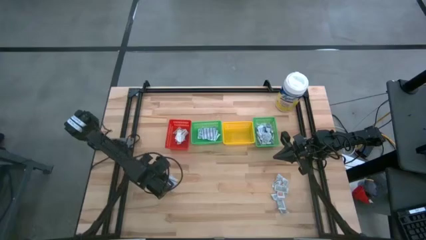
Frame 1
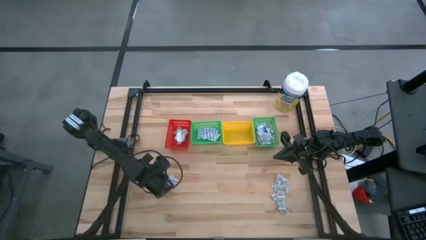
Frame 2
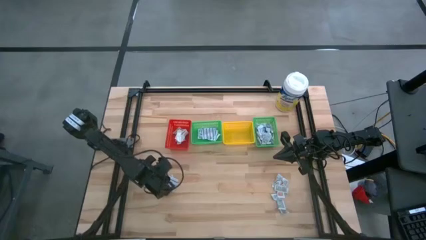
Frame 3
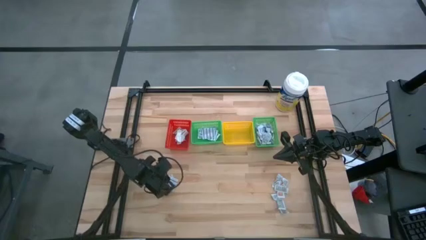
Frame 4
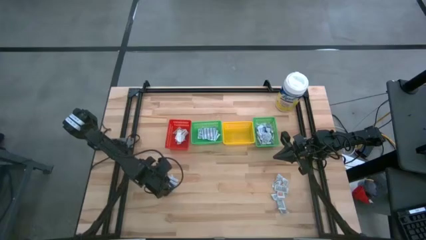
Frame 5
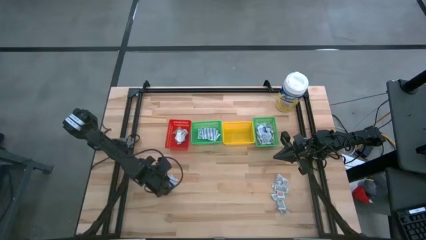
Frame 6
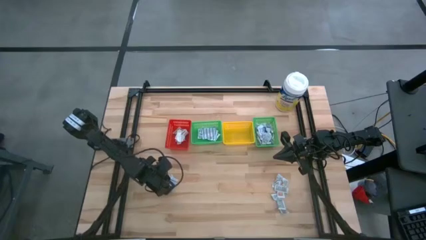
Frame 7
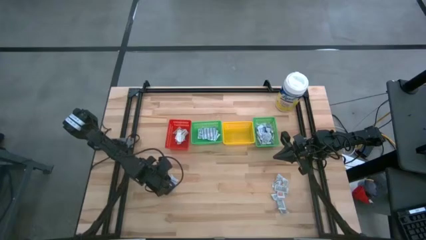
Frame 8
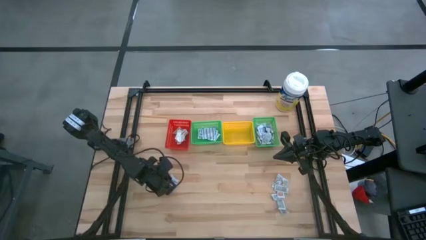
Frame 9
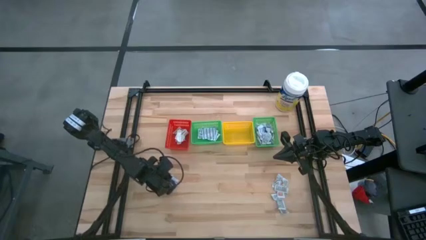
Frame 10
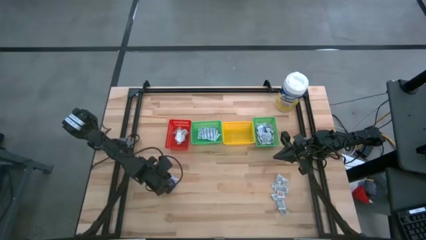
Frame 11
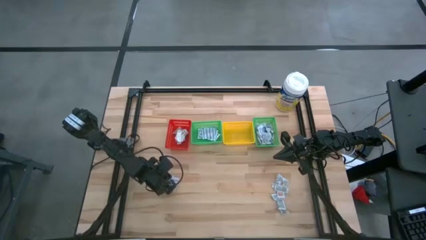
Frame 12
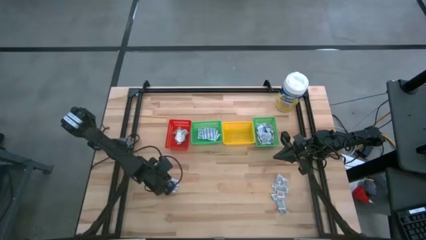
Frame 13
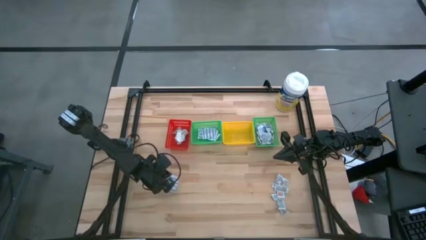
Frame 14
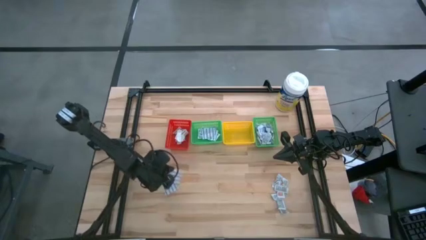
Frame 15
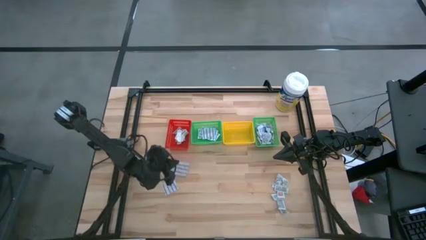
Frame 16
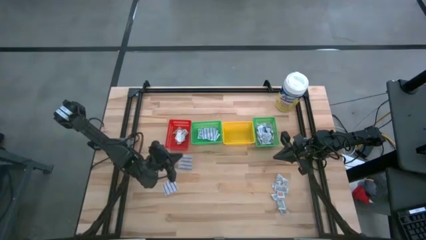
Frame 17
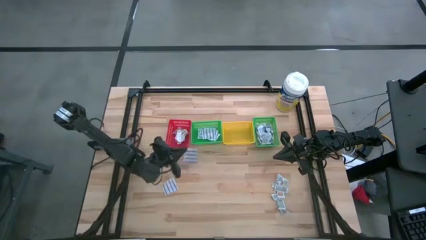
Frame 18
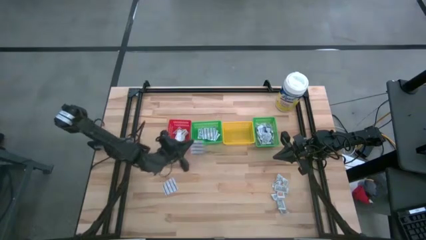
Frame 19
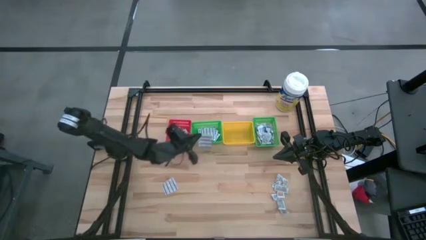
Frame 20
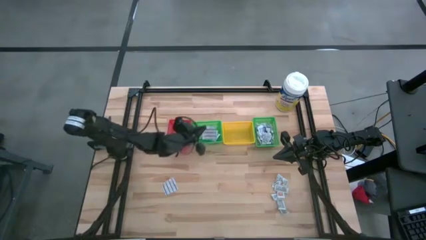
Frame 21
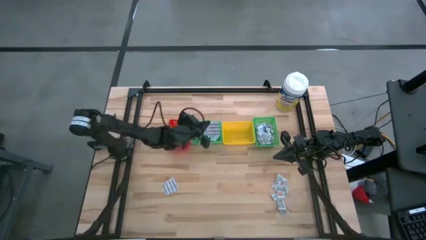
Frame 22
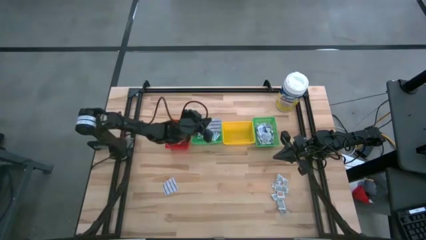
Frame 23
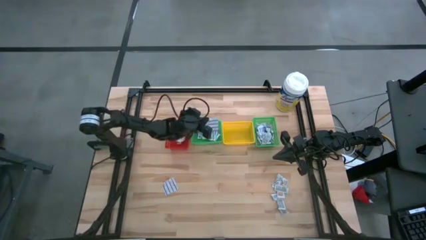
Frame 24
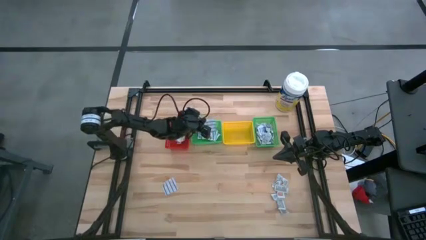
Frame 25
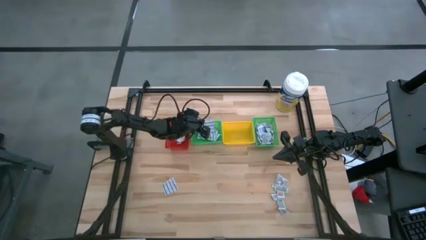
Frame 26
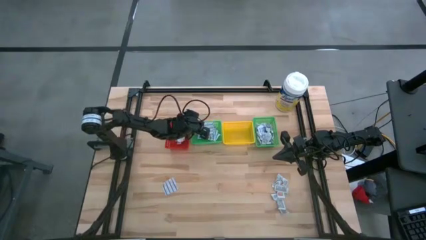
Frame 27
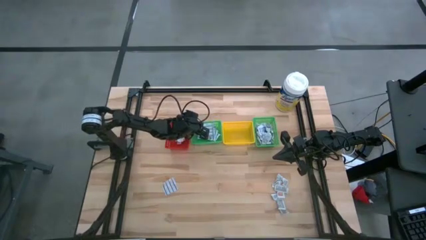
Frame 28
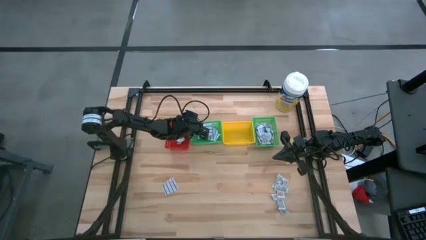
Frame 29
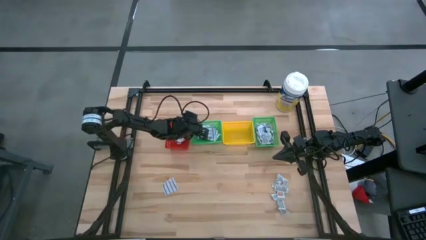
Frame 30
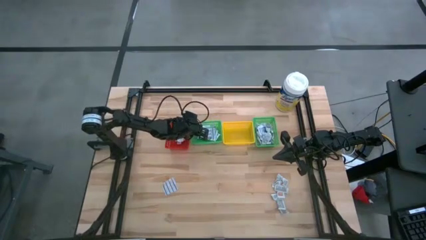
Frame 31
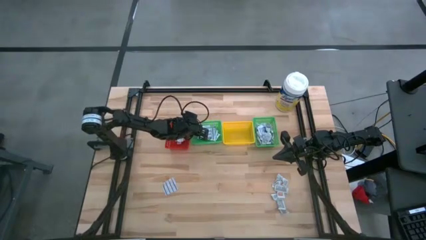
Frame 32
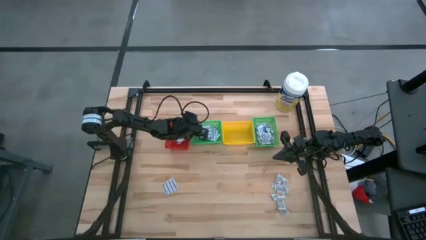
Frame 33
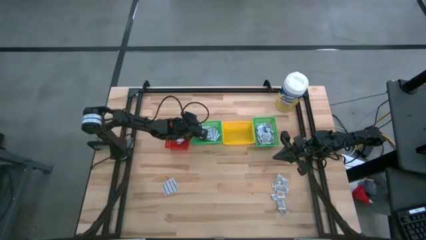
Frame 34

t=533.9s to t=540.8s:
Task: Pick & Place First Aid Supplies
Put the blue bandage into the left green bin

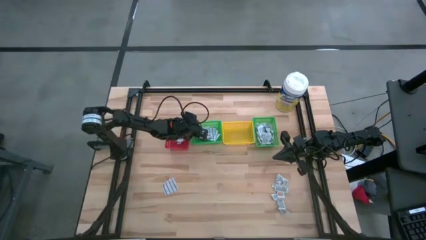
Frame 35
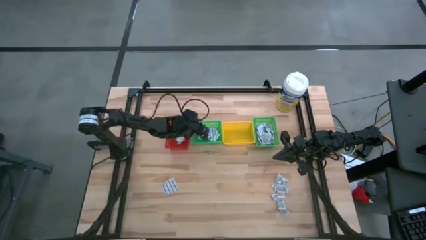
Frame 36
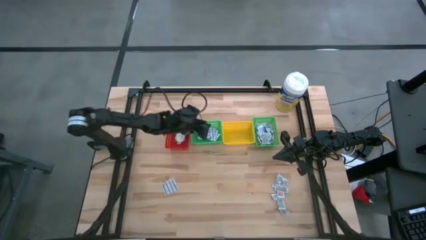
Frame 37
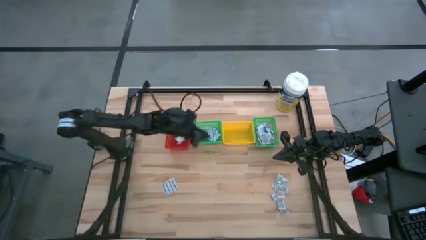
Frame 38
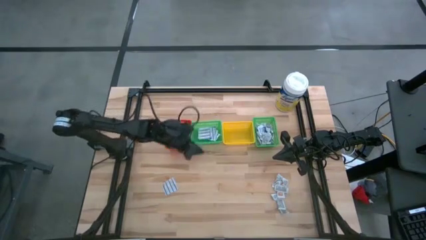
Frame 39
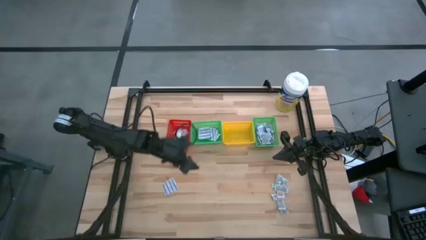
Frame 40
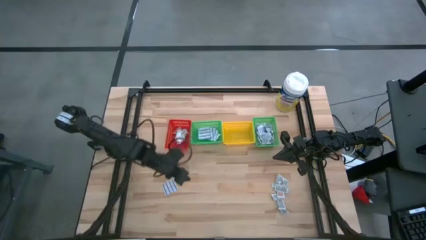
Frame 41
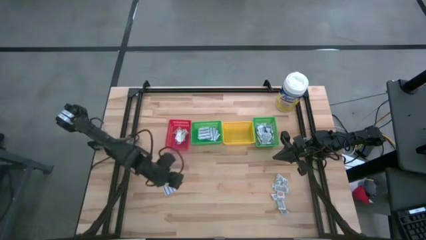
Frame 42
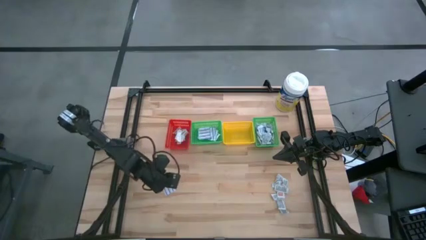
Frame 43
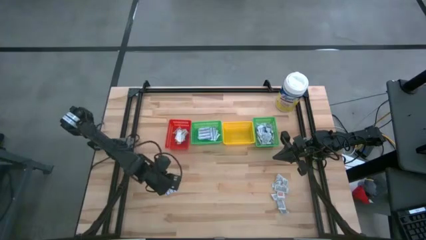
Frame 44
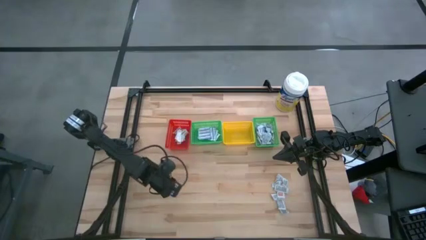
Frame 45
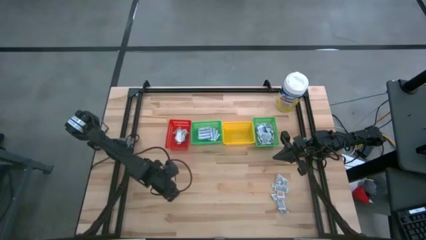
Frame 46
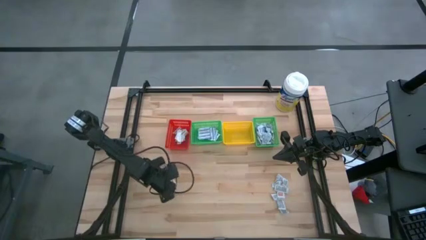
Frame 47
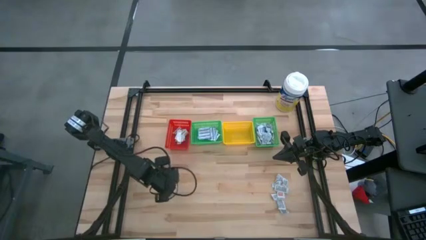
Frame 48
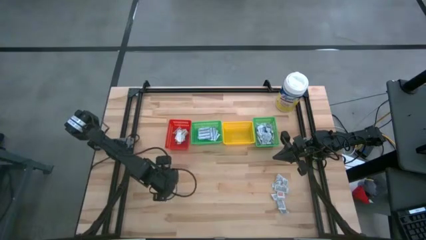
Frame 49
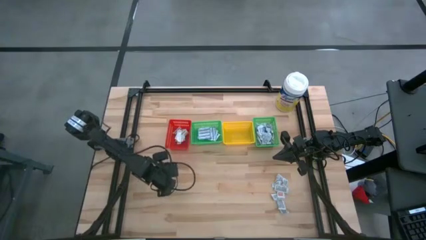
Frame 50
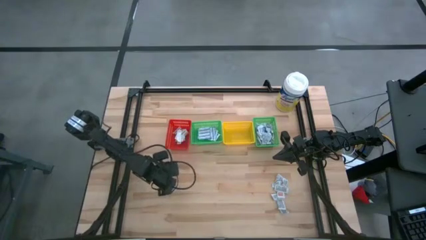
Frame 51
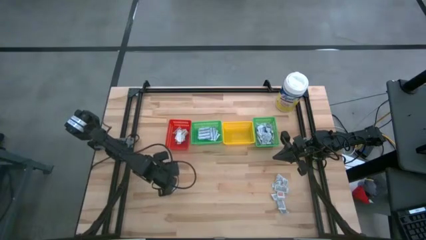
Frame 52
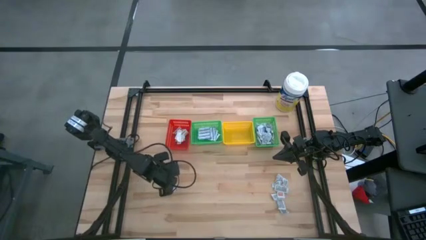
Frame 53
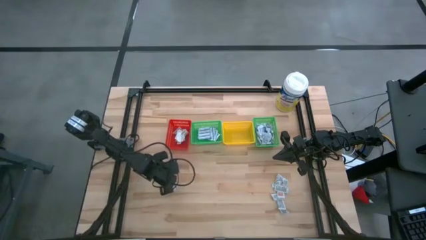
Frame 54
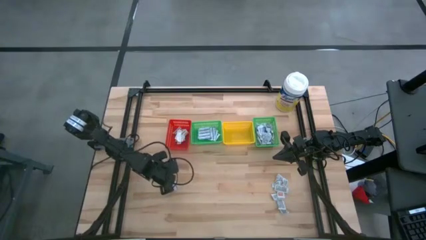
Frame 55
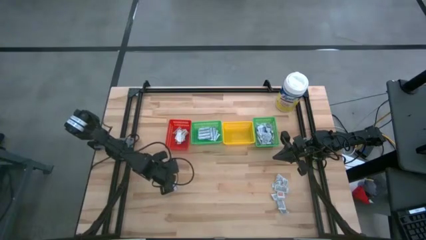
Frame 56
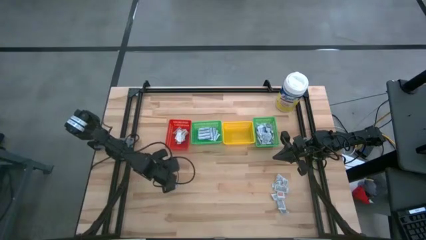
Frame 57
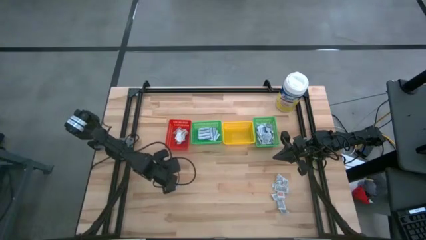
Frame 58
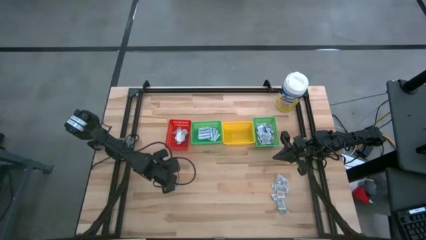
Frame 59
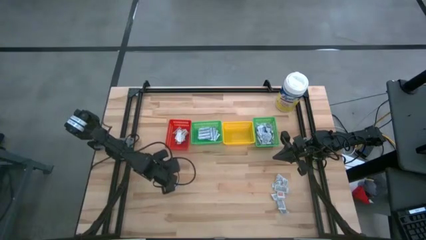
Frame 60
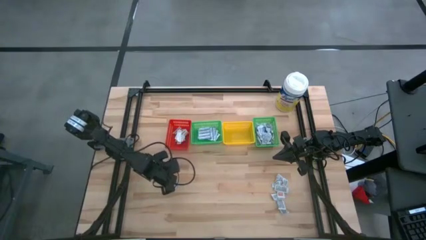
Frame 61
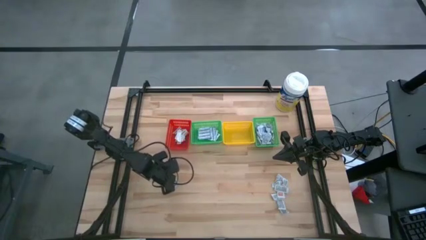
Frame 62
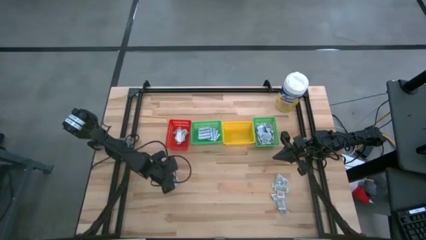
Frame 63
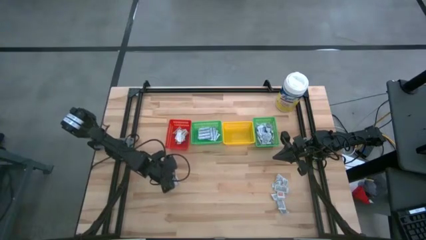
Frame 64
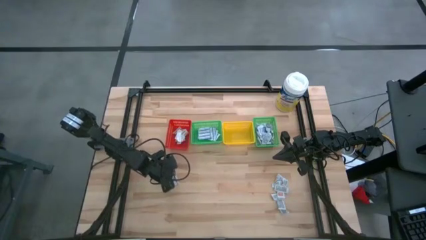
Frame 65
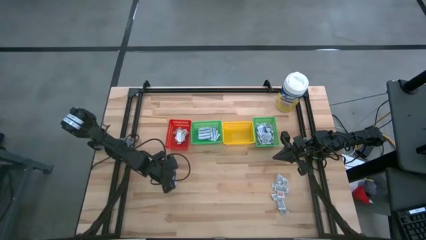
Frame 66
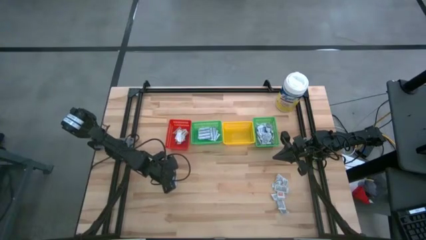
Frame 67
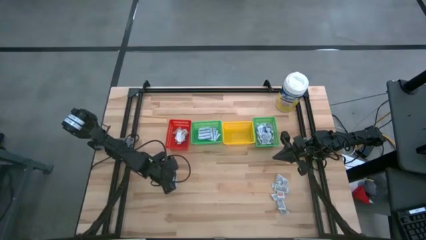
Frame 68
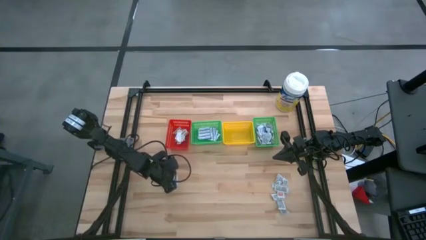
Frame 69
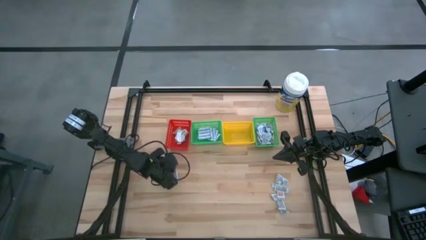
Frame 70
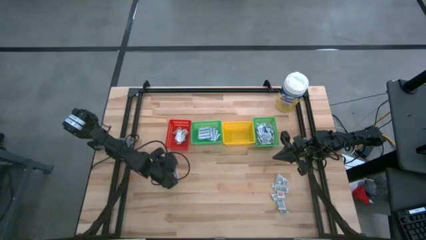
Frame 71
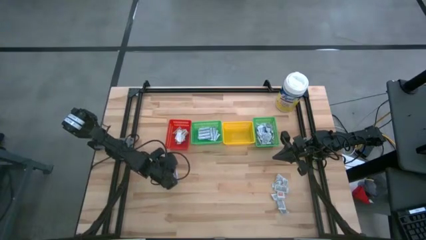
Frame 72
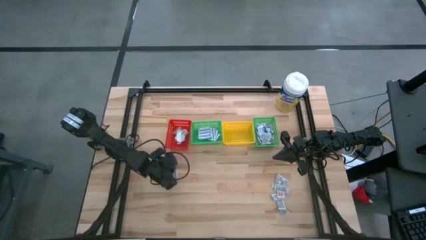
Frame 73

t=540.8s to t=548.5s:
Put the blue bandage into the left green bin
